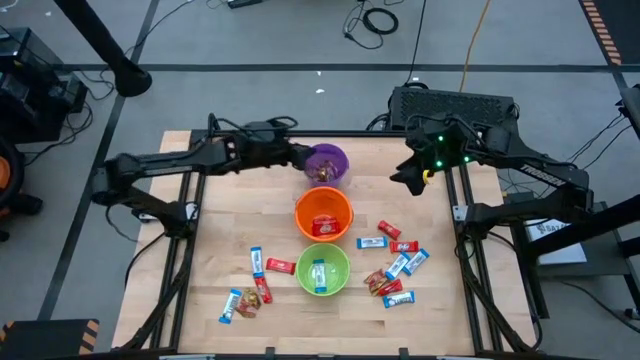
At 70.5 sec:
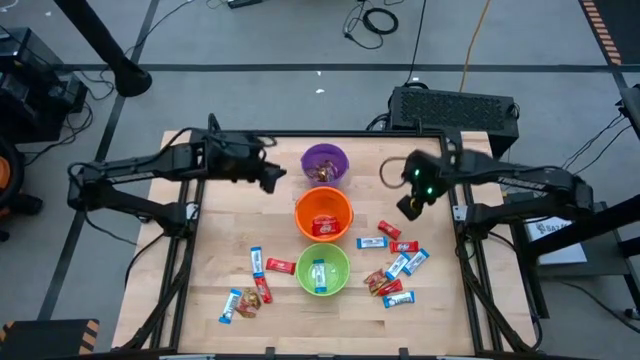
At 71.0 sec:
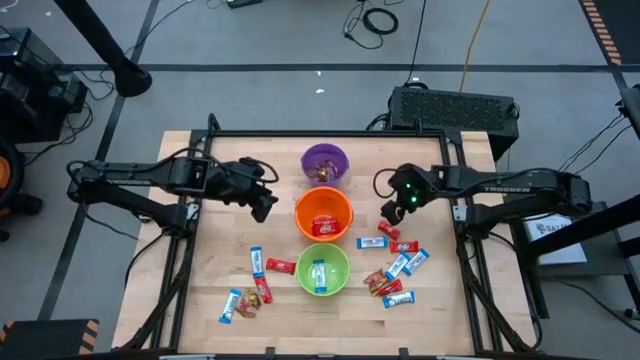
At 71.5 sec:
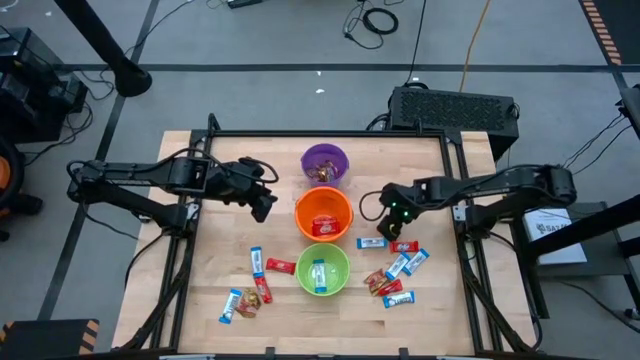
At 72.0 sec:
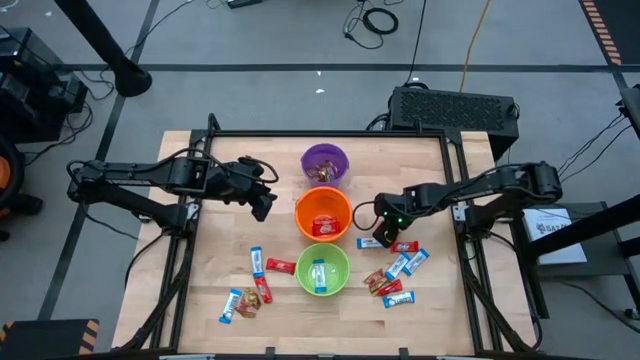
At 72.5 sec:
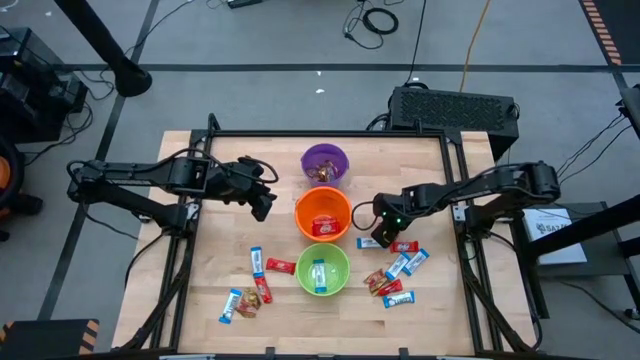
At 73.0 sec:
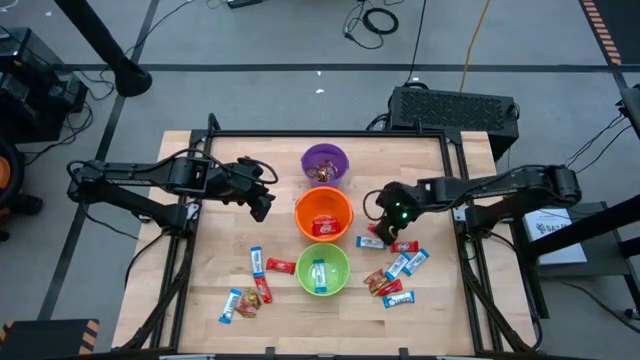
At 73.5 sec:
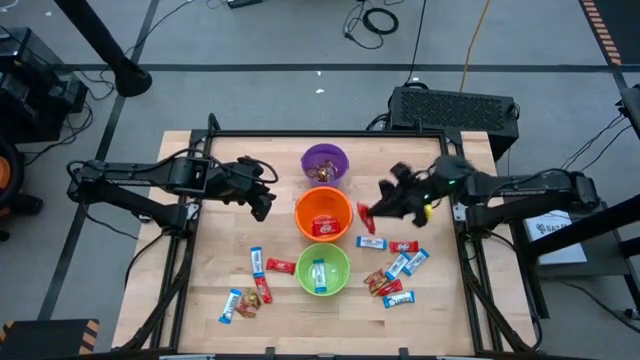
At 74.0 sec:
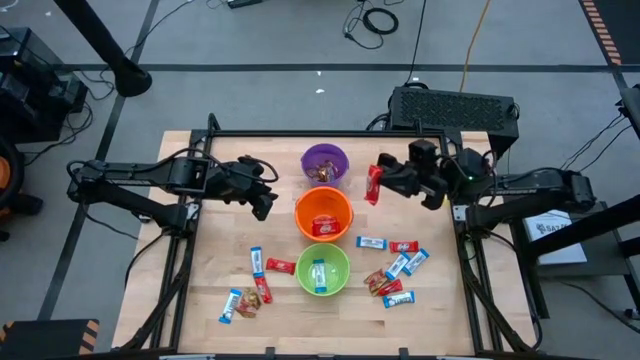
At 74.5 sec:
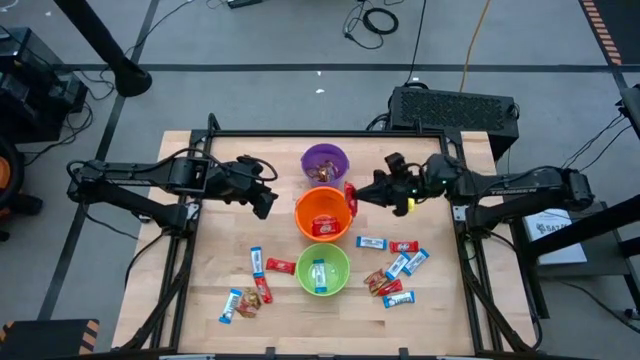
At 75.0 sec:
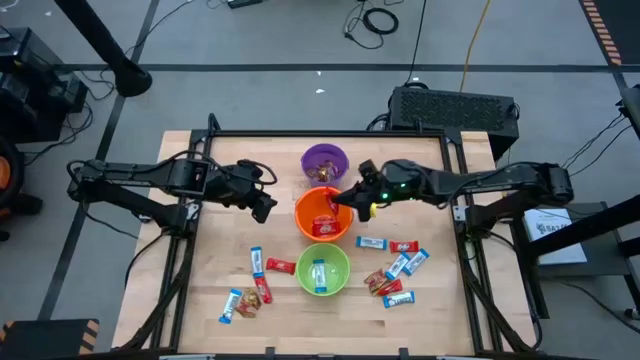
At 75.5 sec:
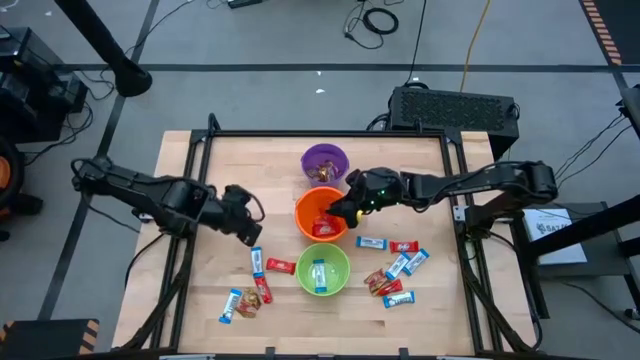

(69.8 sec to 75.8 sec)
Task: Sort candy by brand, put in halloween buckets
Put red chocolate bar into the orange bucket

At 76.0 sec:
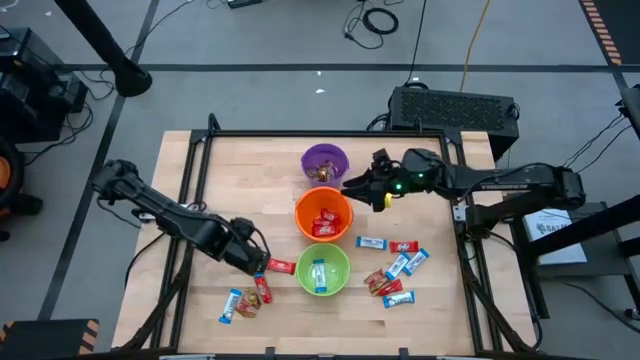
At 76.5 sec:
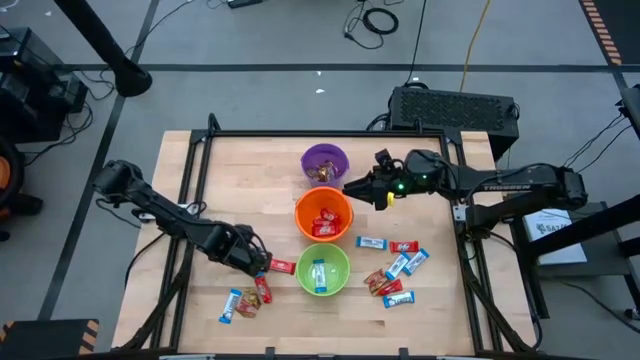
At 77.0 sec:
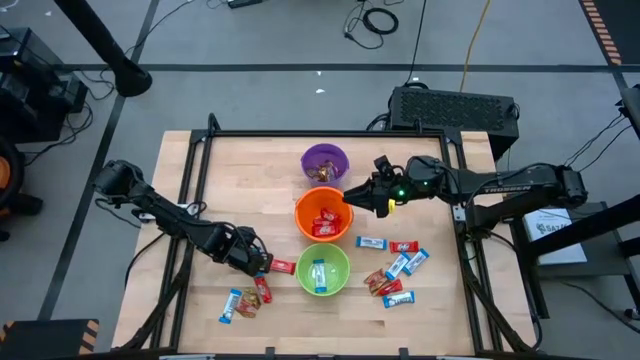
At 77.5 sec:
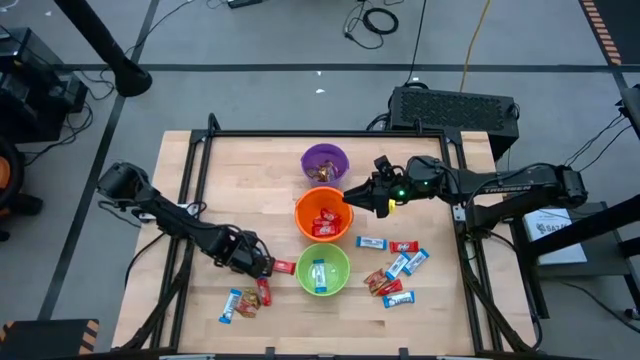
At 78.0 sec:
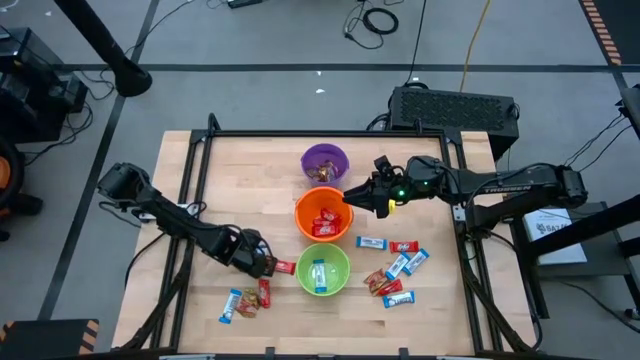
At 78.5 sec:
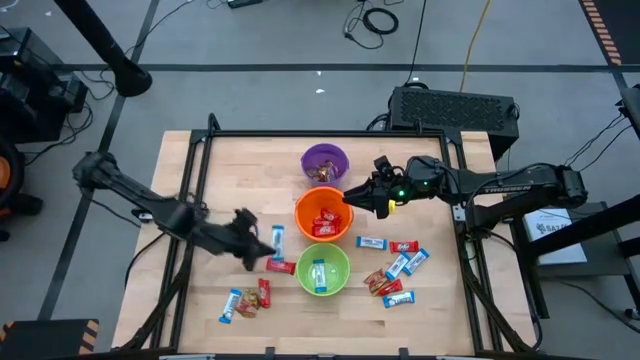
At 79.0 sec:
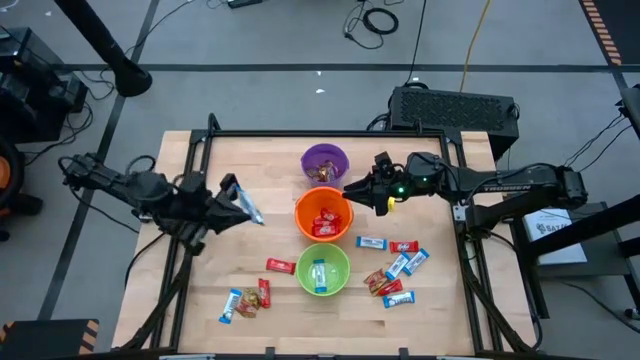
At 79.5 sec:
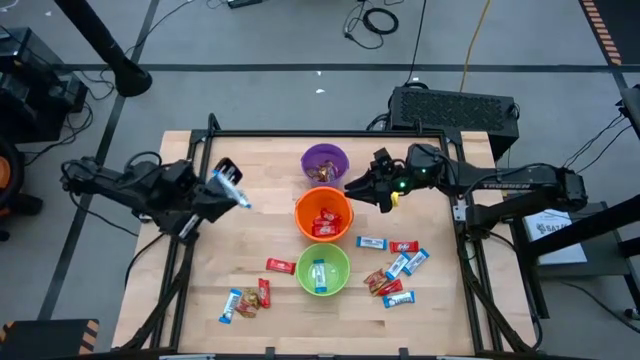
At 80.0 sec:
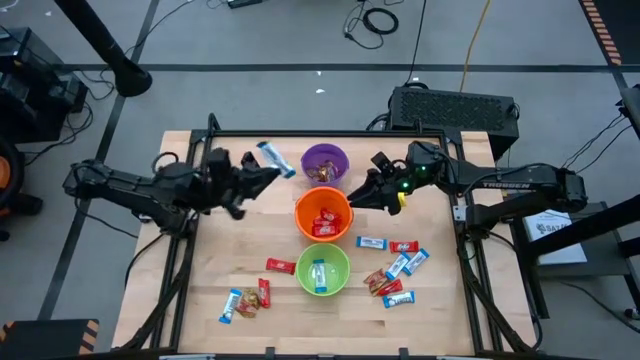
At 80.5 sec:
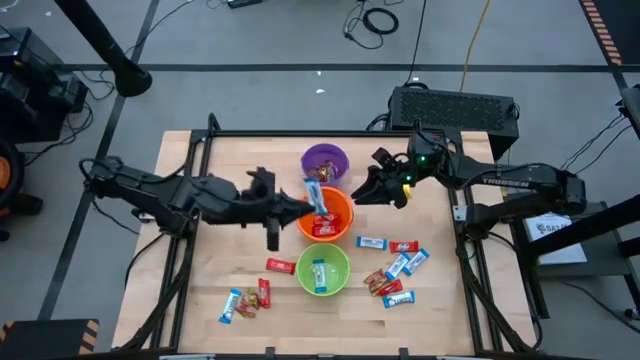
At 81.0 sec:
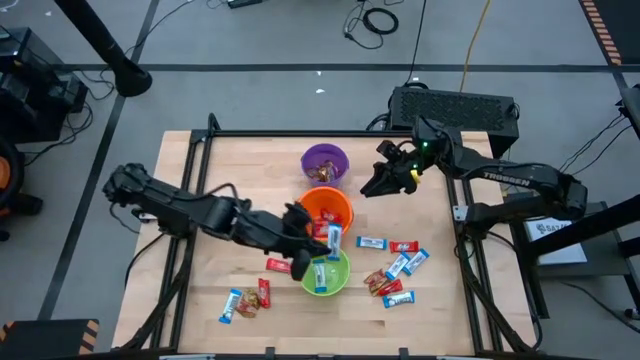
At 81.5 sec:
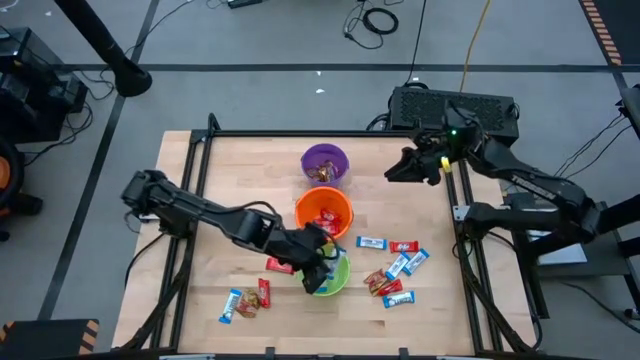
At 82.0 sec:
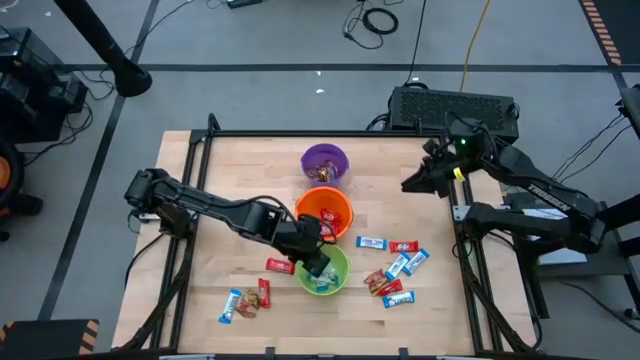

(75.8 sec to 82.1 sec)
Put blue chocolate bar into the green bucket

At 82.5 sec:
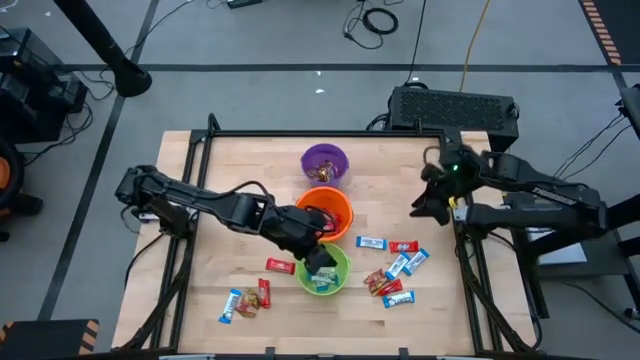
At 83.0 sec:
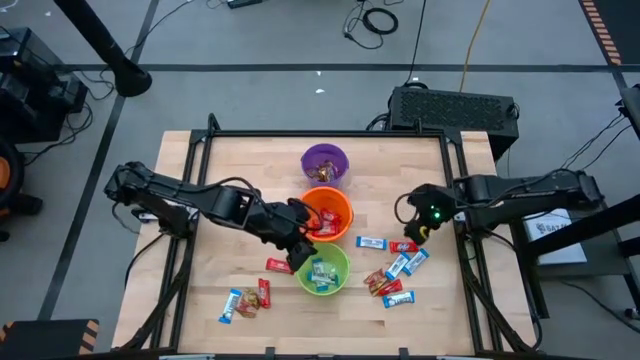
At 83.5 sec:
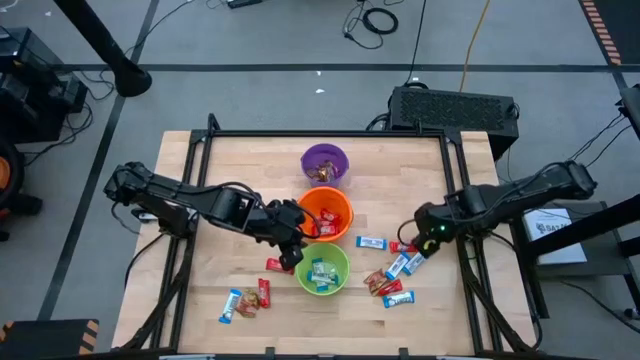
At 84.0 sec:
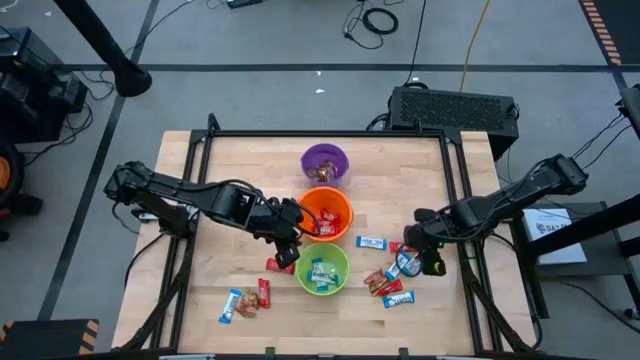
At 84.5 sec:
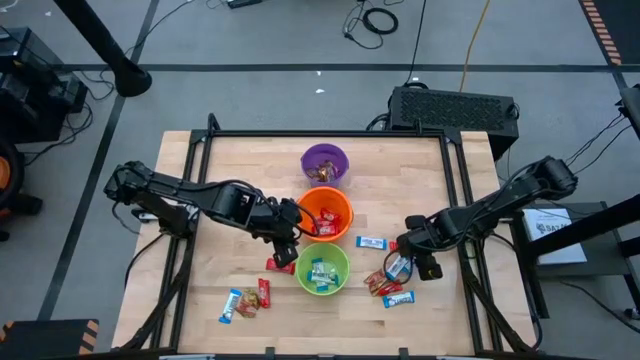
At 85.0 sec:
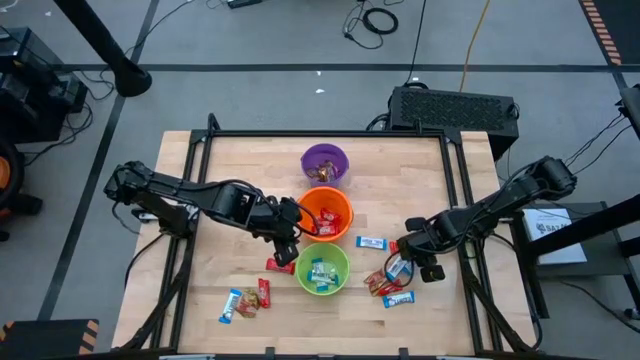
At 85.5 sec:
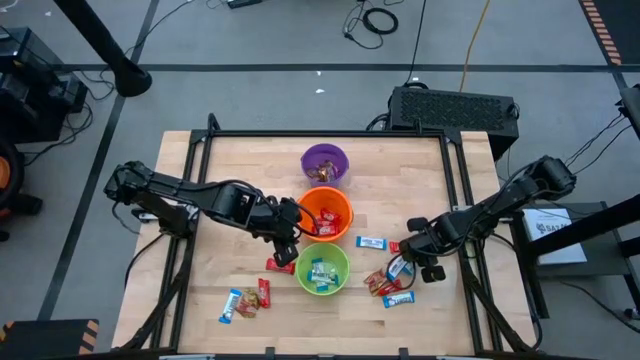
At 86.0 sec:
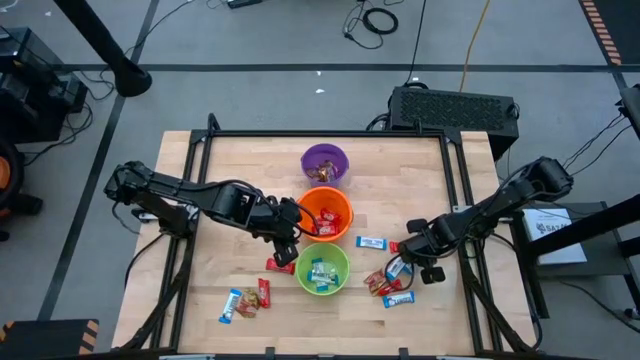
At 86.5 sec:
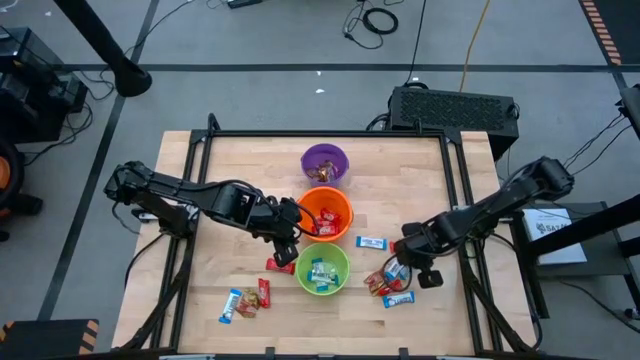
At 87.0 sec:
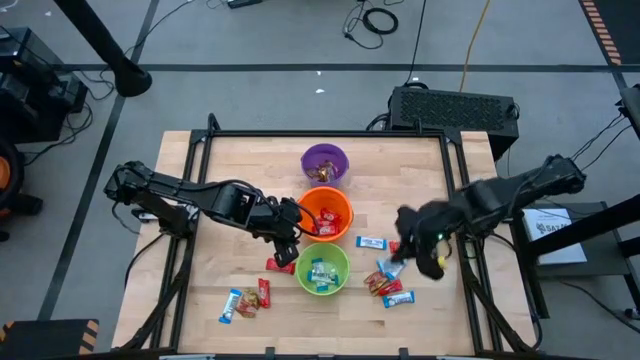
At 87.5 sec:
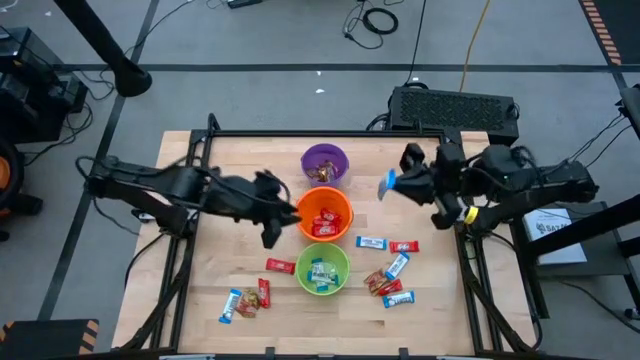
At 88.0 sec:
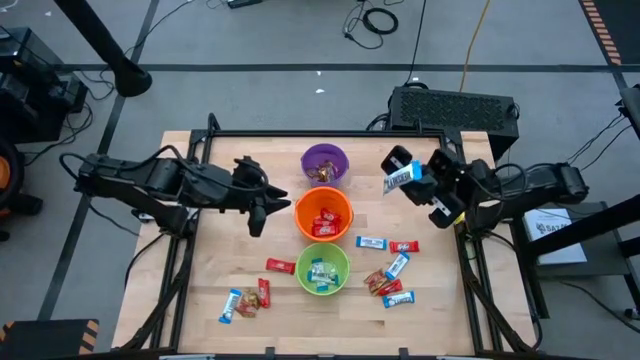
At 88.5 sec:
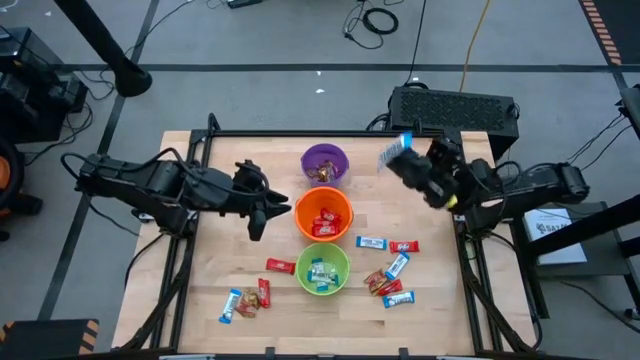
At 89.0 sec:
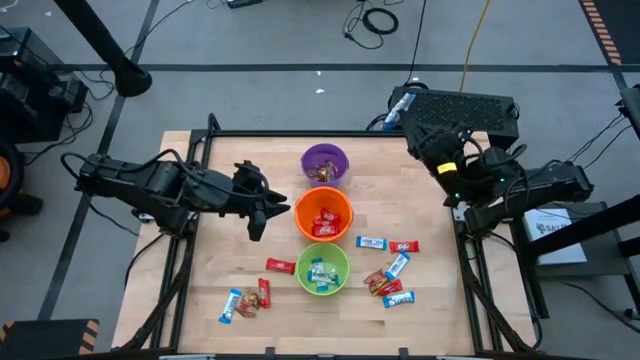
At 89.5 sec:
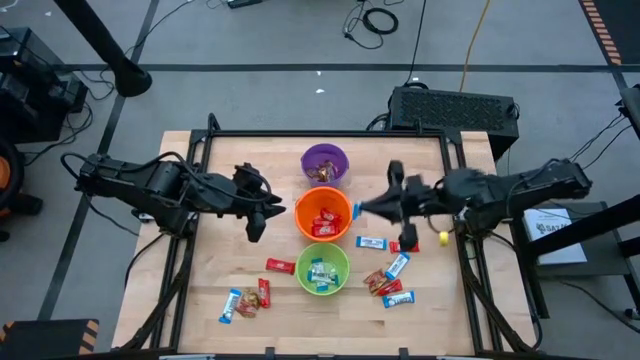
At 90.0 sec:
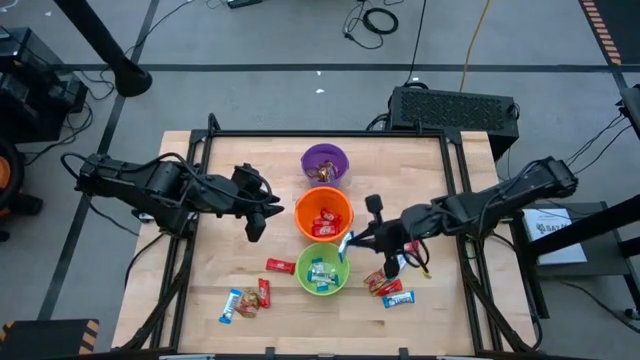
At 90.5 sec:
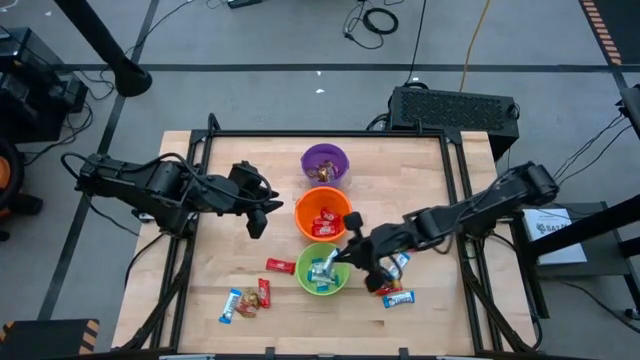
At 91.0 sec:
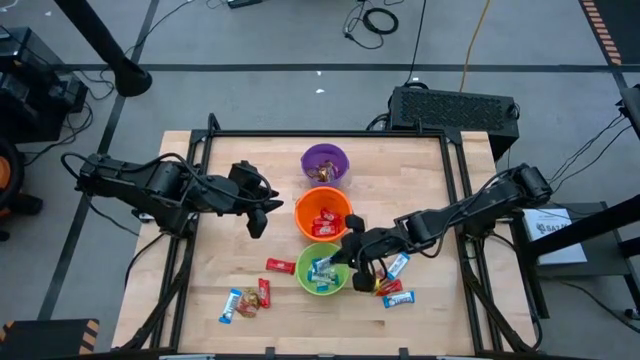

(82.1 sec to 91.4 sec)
Put blue chocolate bar into the green bucket

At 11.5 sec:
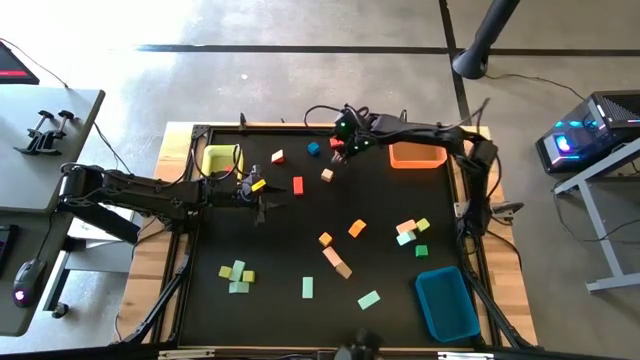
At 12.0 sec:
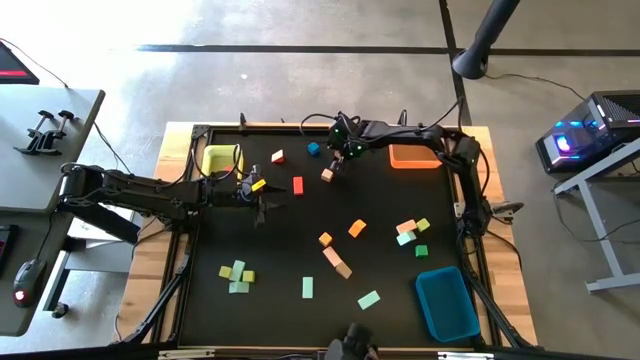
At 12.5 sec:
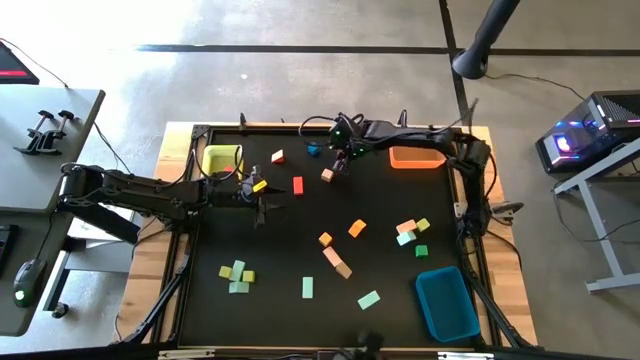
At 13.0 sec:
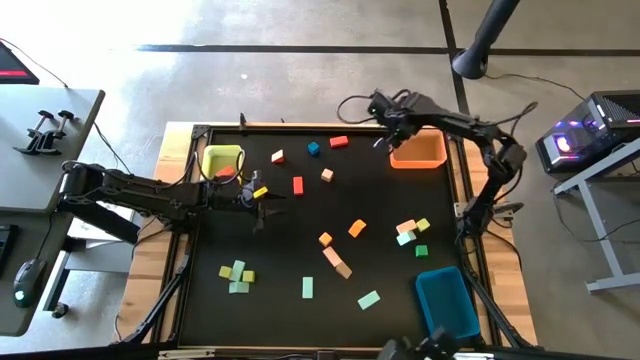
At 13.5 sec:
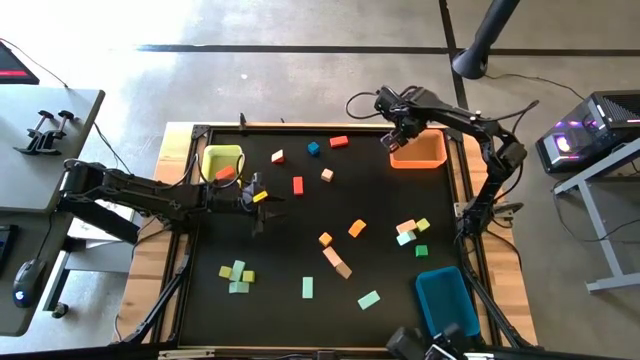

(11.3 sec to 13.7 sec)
Task: Sort blocks by size
Put the light orange triangular block into the orange bin
